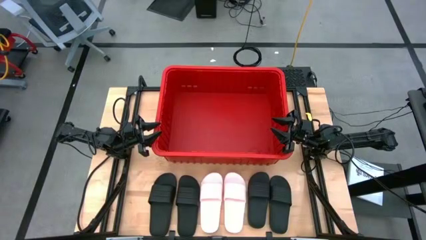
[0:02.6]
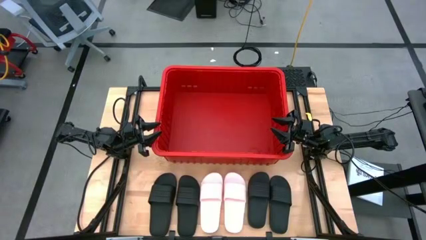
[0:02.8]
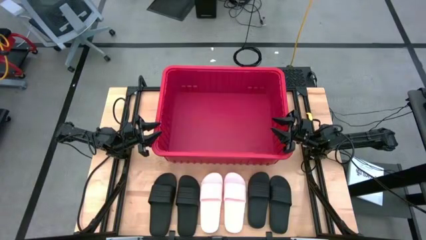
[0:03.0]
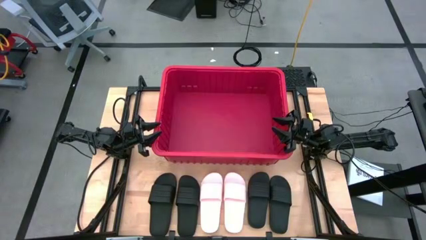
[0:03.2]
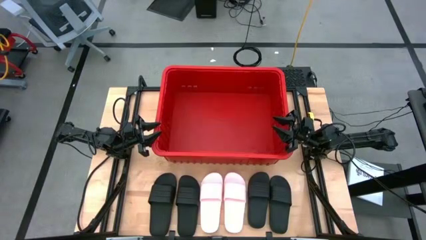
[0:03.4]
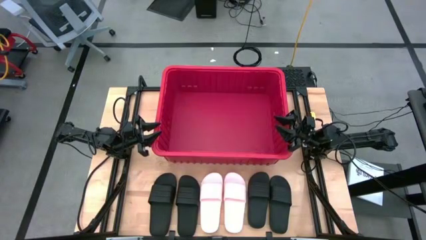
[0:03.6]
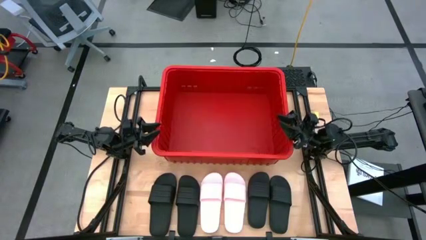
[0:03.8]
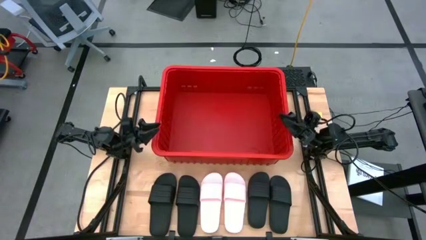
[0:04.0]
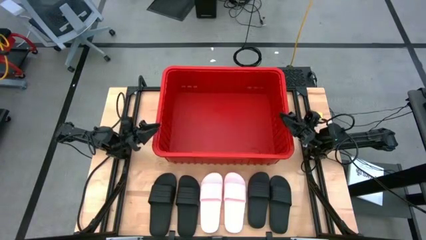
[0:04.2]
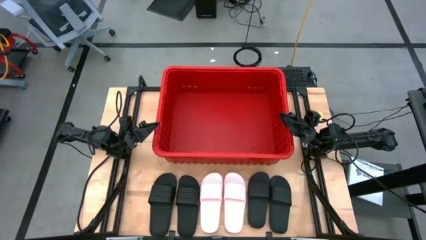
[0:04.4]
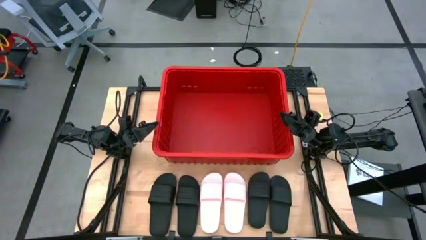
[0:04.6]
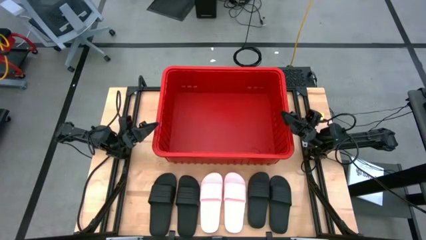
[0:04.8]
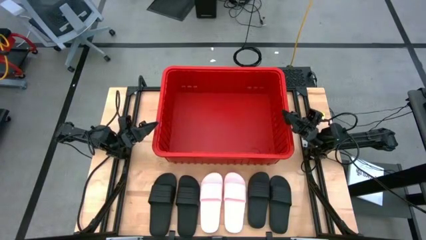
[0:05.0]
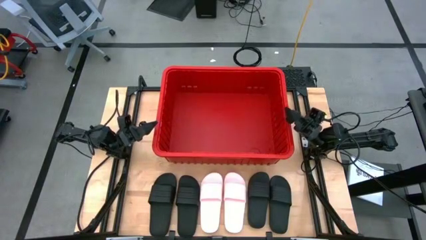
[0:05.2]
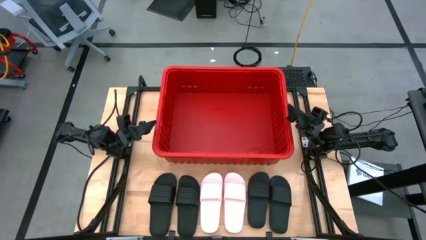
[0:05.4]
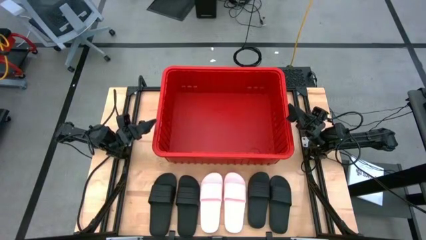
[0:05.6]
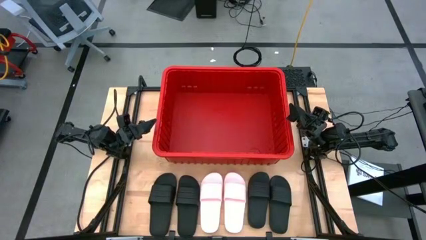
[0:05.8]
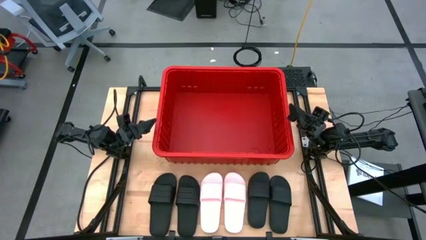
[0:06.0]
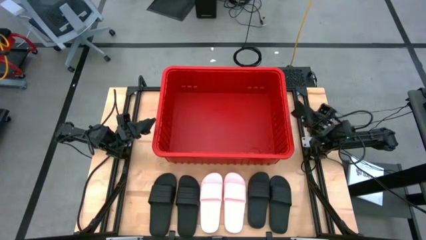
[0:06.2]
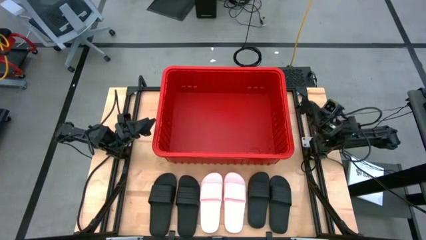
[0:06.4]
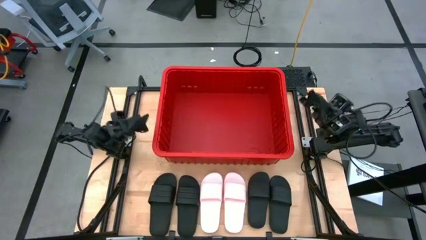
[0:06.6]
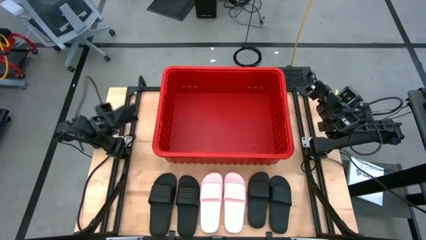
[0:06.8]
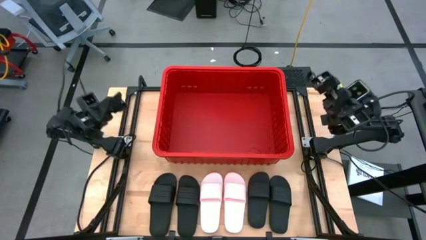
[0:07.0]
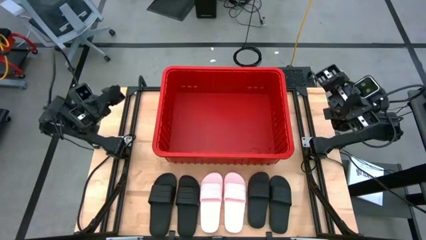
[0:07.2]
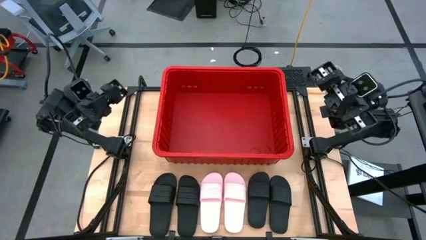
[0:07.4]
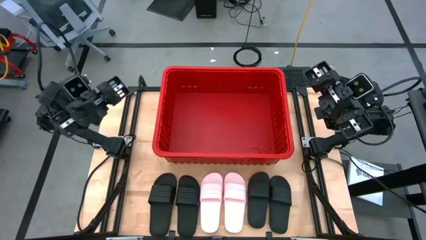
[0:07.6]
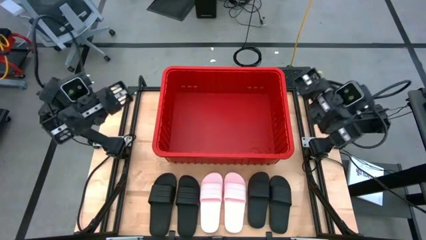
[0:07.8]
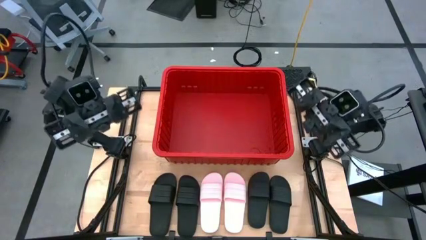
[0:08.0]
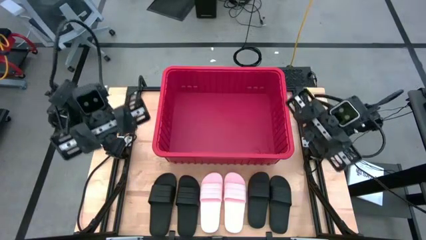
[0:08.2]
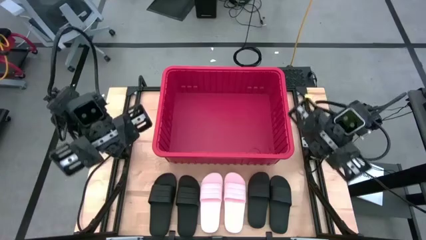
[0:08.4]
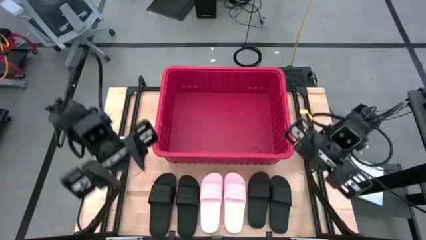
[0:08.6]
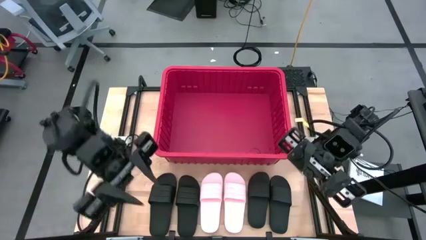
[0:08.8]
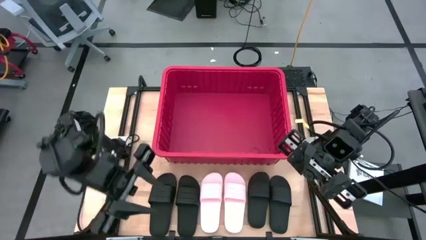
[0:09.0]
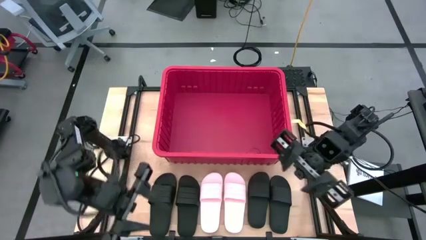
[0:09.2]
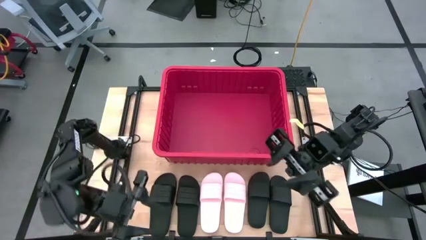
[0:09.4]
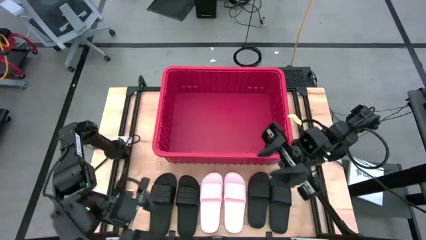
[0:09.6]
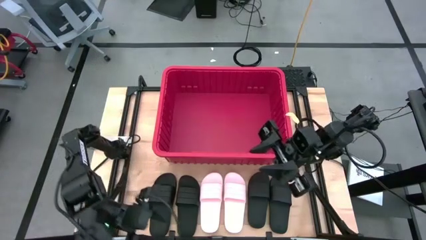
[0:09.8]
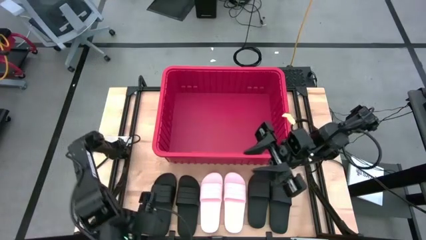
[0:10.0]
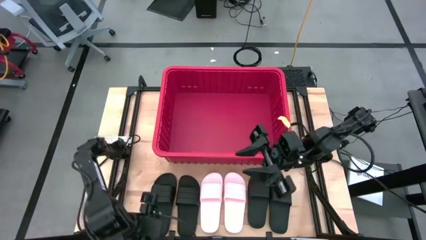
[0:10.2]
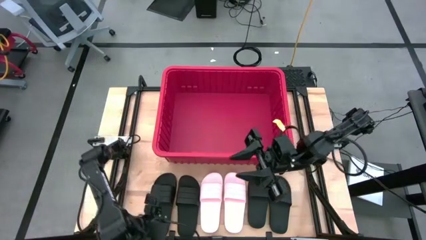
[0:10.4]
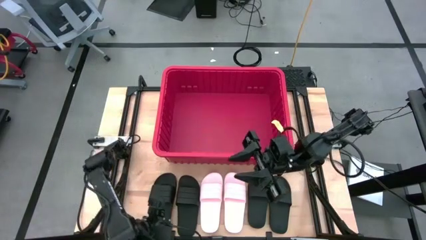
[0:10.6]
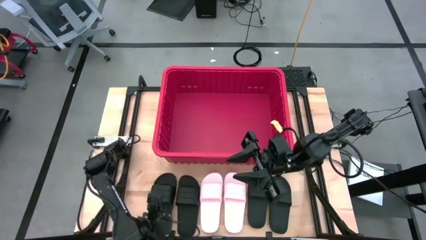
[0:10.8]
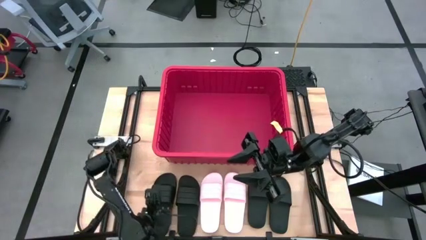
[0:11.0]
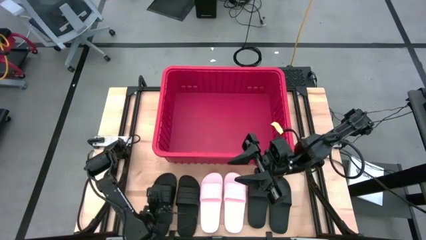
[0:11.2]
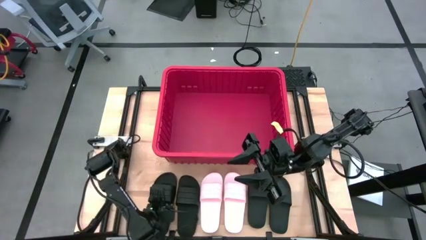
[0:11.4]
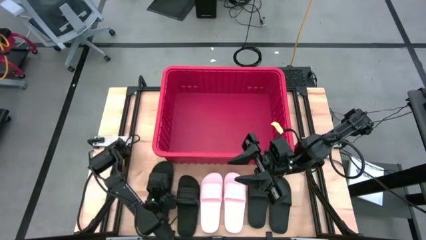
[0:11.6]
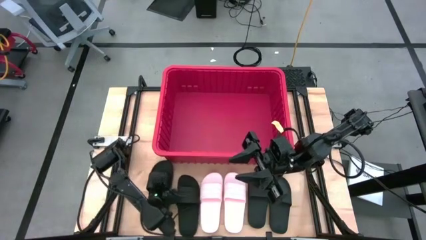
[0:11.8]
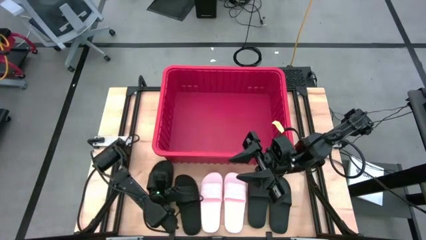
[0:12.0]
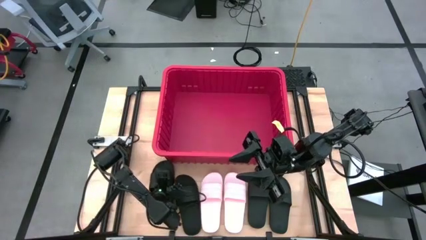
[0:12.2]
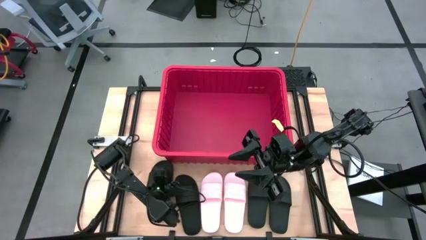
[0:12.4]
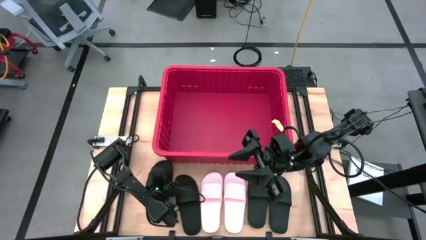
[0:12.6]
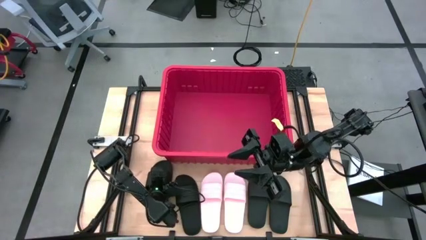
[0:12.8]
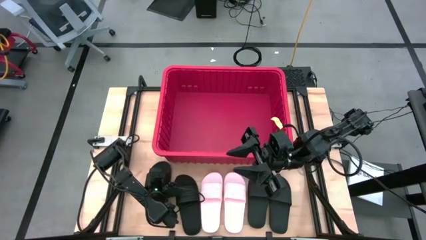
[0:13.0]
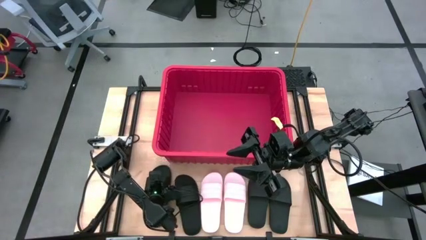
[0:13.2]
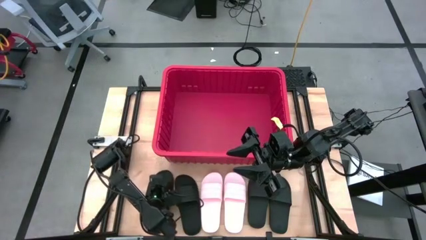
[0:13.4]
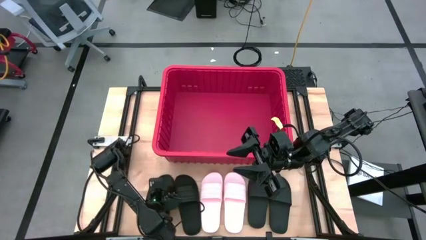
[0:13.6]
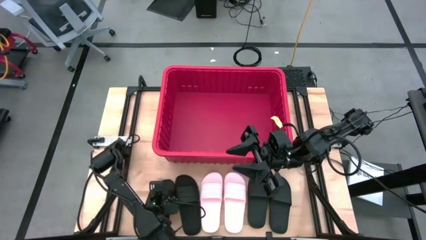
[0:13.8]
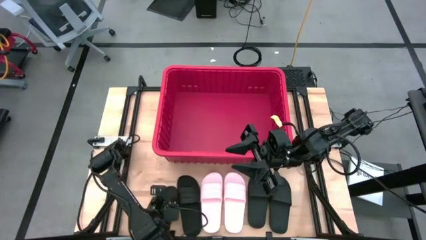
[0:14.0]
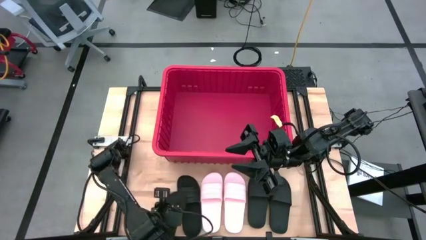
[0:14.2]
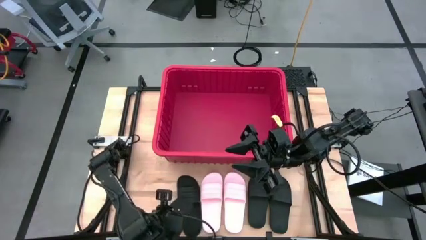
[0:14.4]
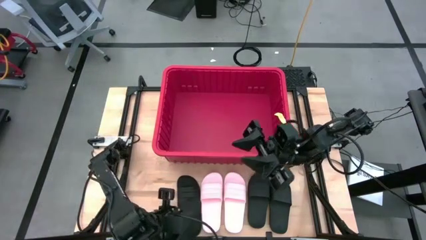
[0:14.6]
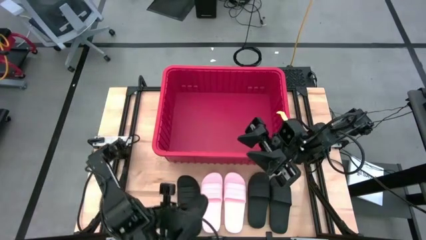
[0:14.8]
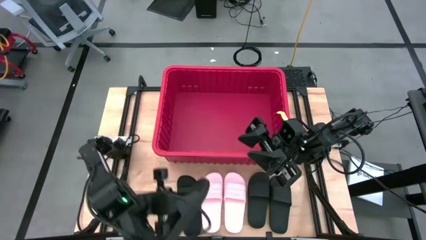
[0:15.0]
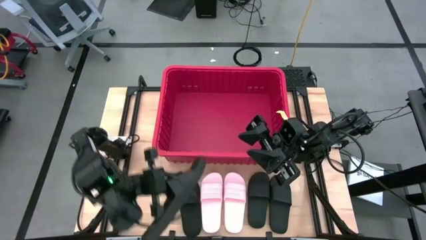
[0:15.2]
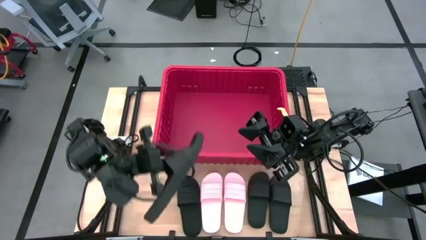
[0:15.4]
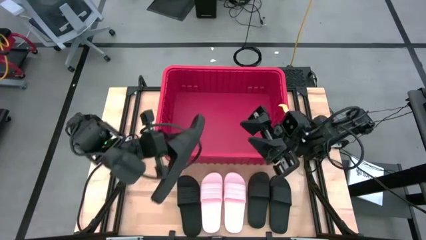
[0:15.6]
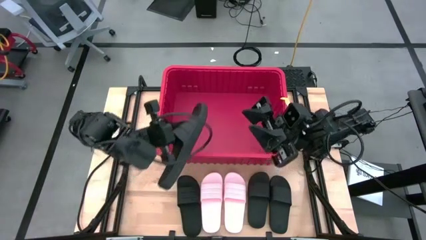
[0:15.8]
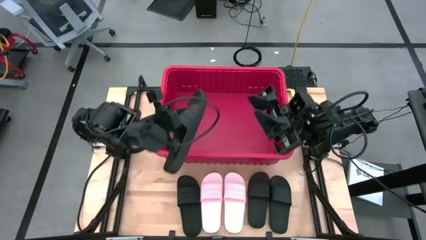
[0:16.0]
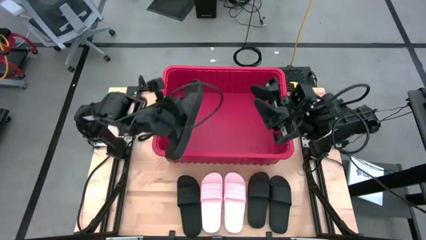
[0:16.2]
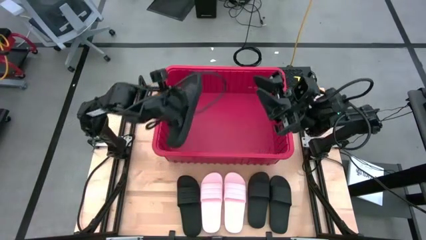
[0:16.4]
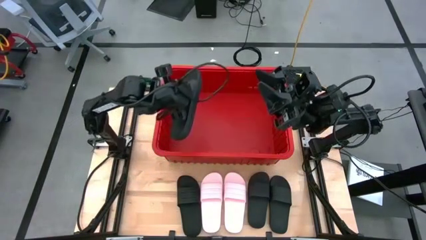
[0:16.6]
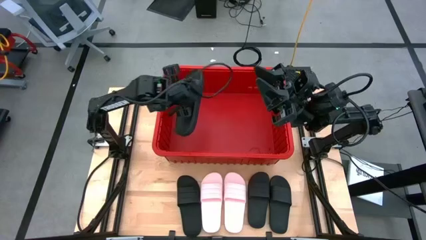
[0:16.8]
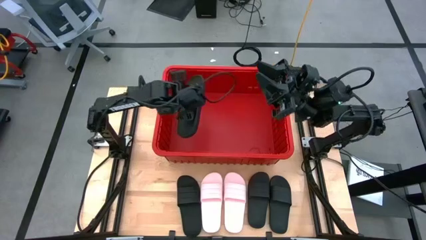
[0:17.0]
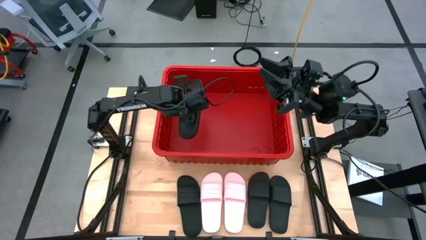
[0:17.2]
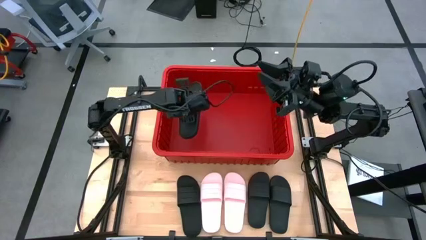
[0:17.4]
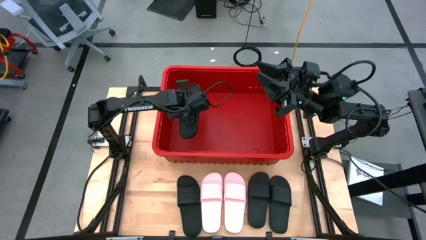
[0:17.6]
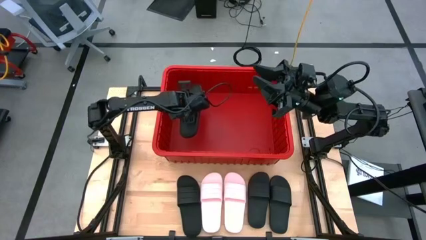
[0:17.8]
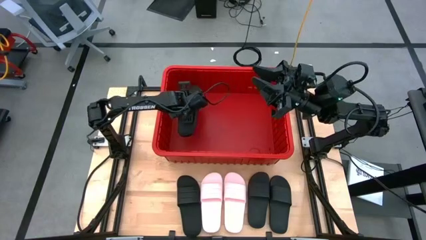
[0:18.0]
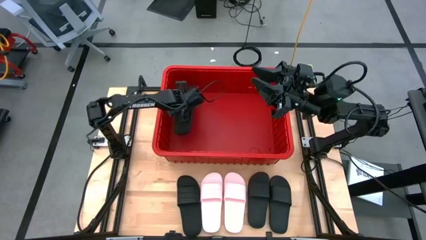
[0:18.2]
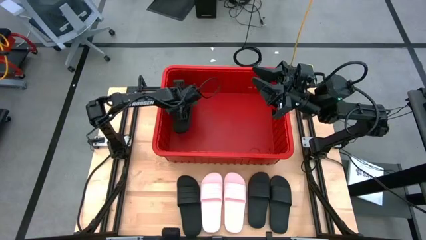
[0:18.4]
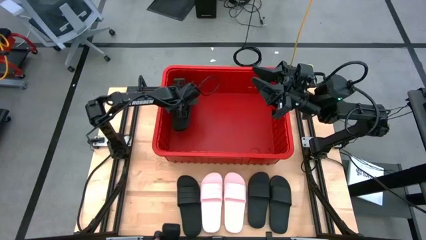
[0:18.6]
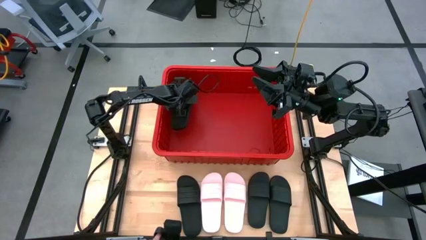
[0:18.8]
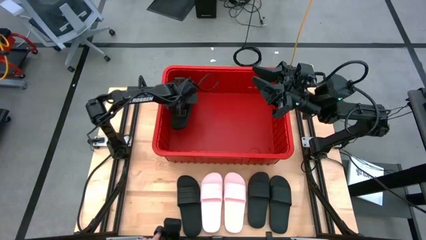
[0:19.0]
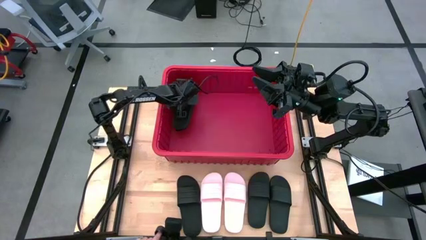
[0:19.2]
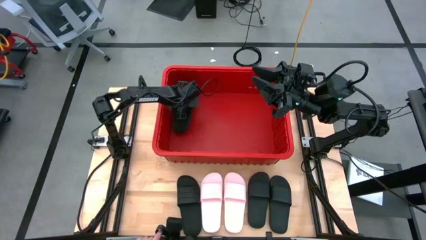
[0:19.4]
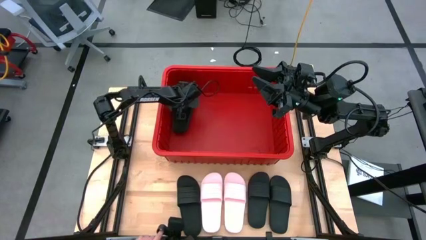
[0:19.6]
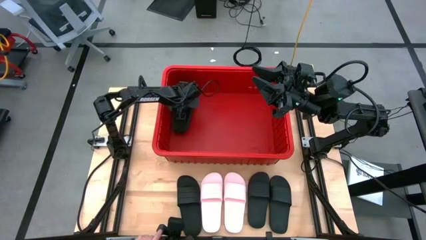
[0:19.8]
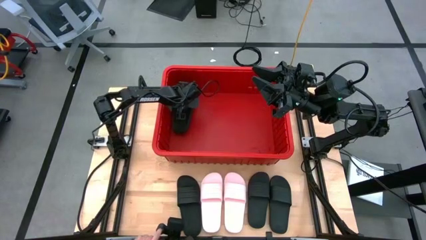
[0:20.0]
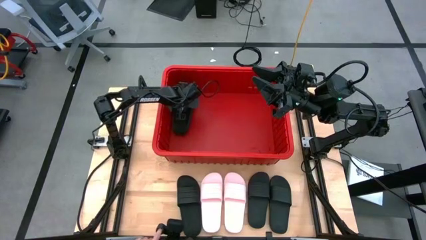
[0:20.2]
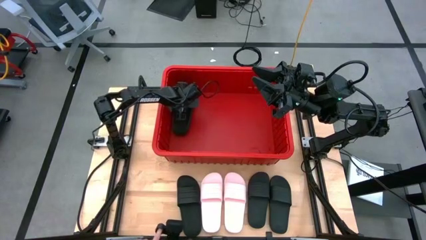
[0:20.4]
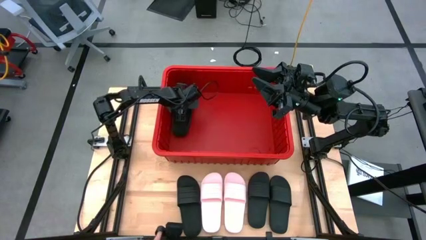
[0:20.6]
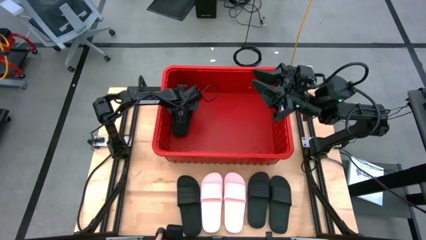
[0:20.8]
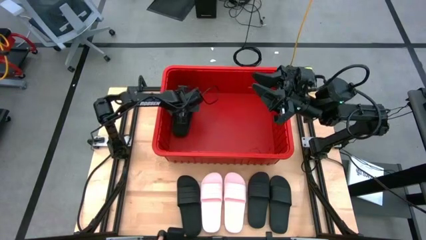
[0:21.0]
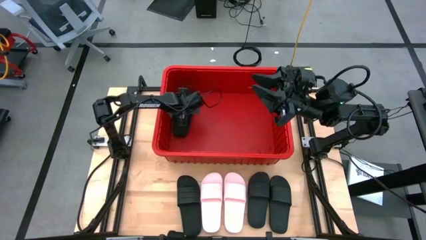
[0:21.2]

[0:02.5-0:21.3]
Task: Pick and place slides into bin
Put the black slides into the red bin
